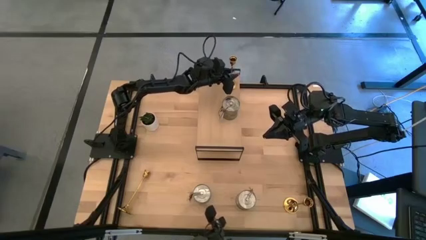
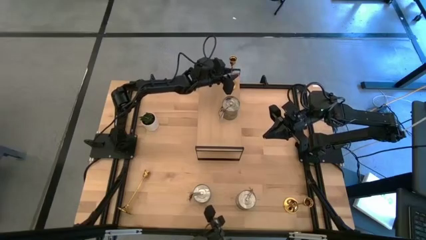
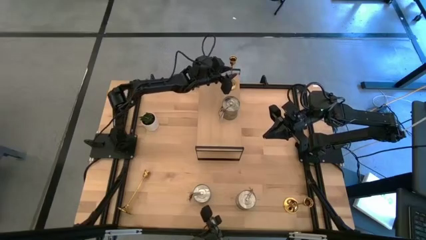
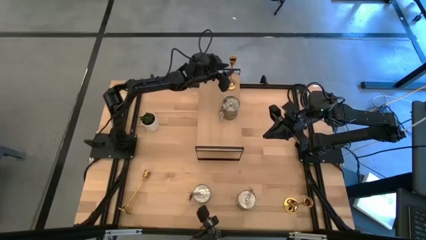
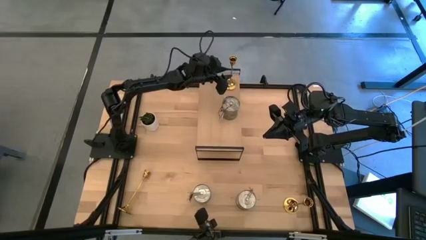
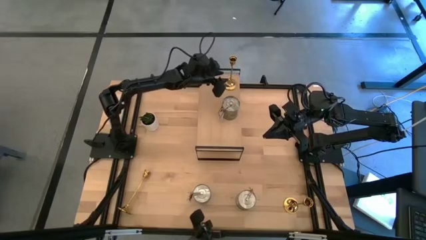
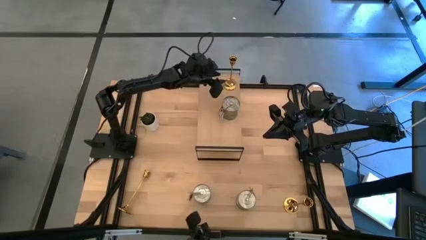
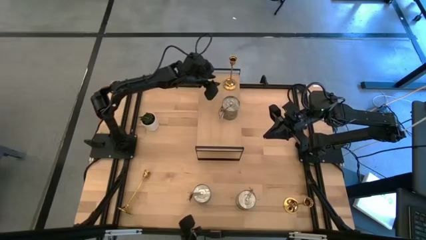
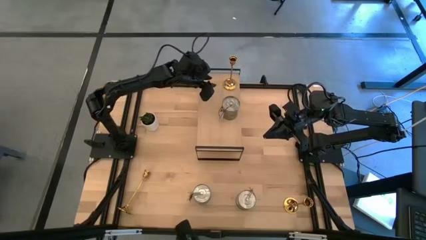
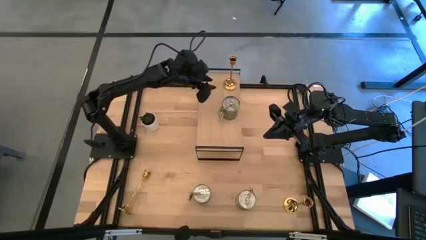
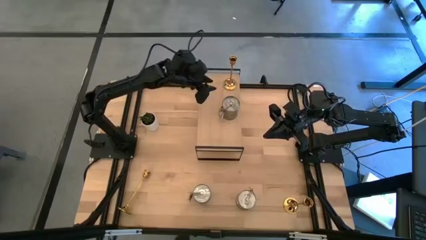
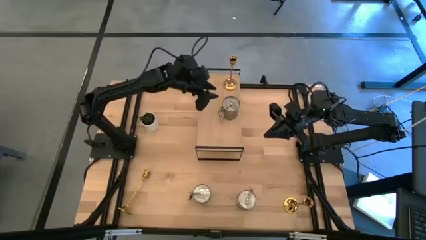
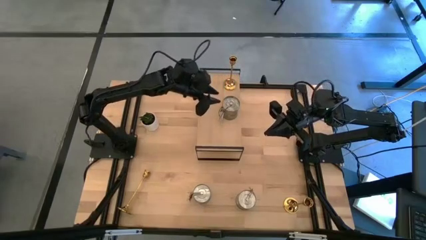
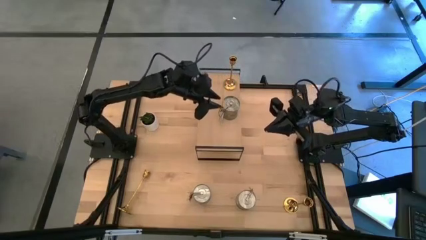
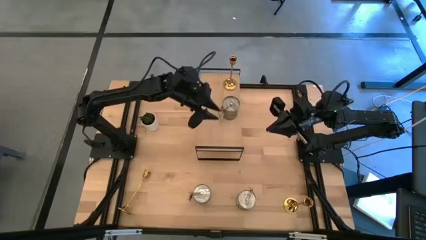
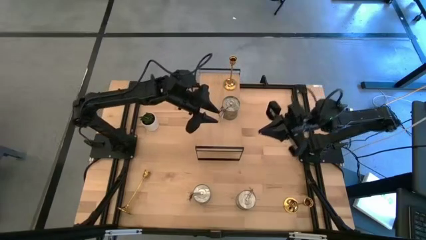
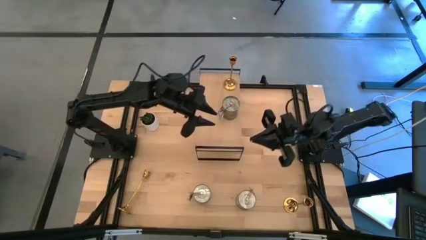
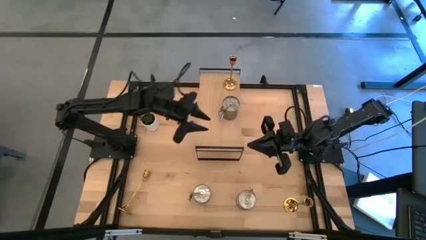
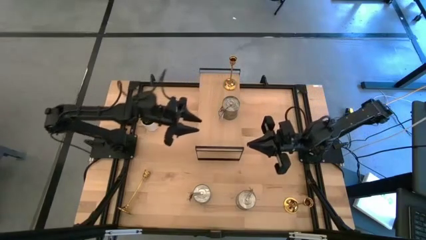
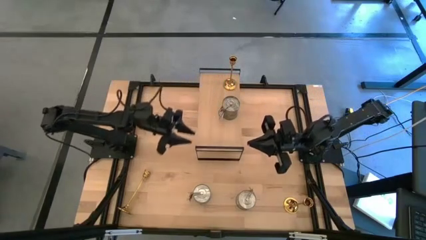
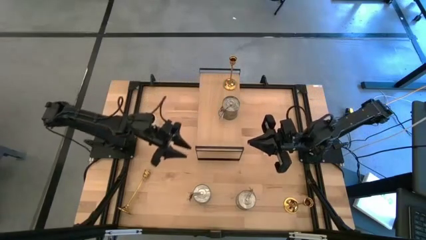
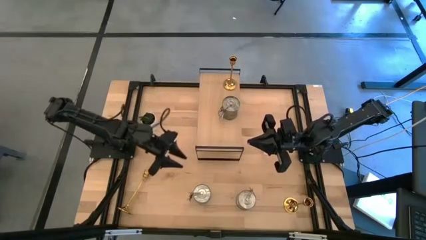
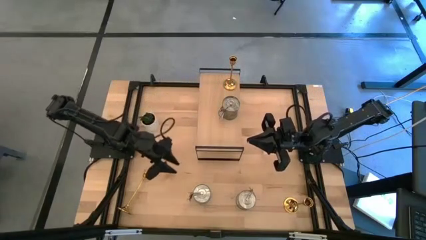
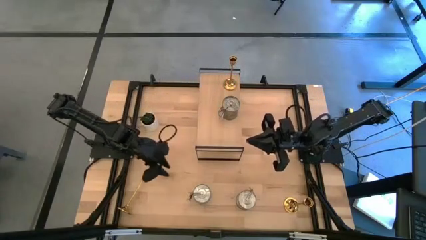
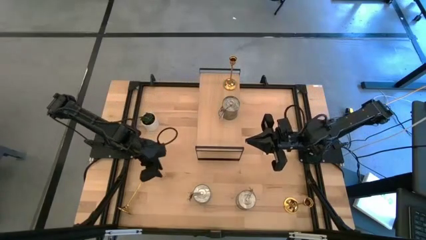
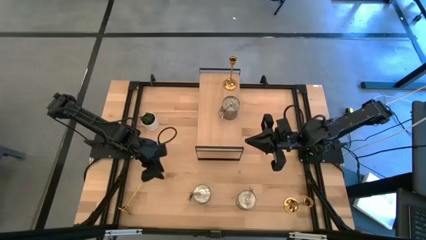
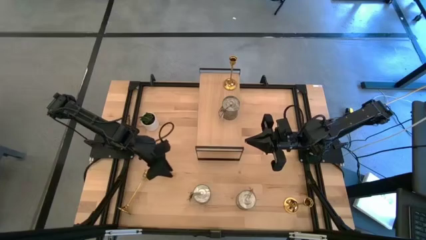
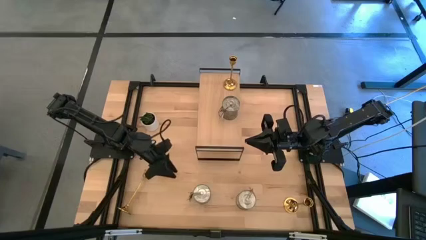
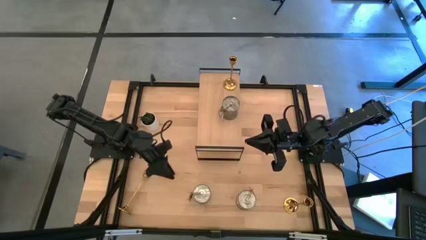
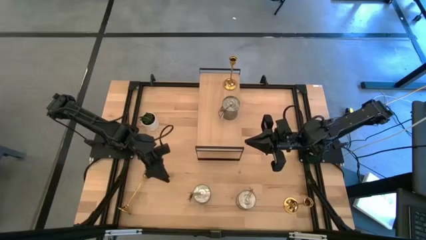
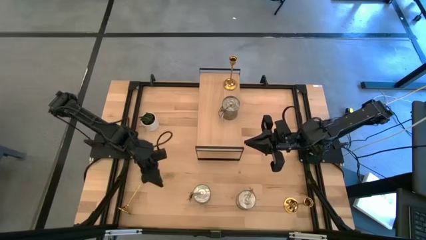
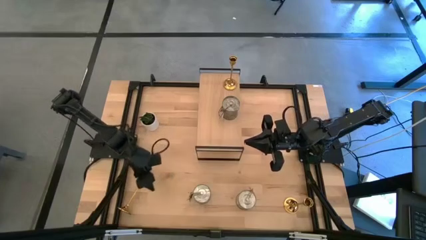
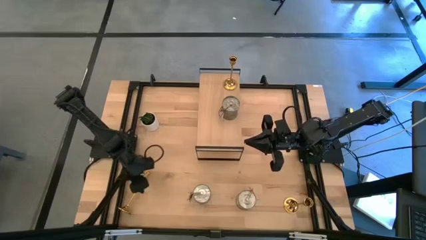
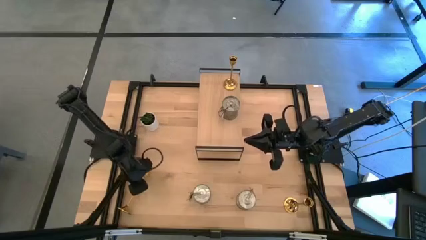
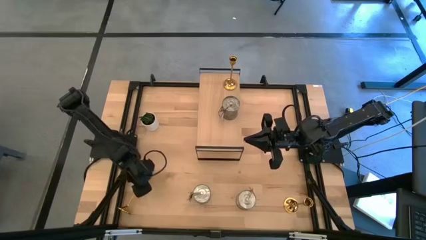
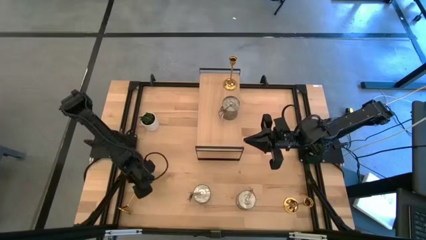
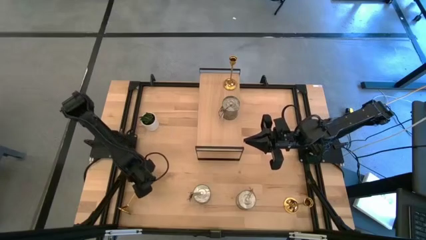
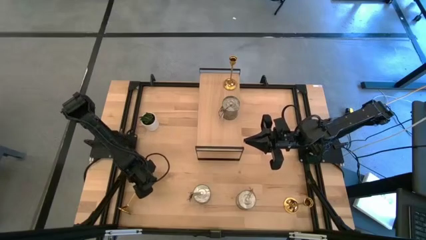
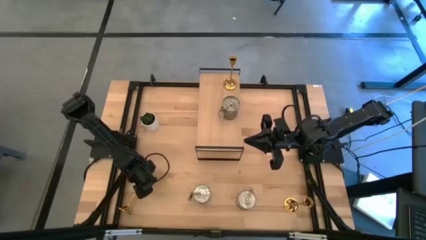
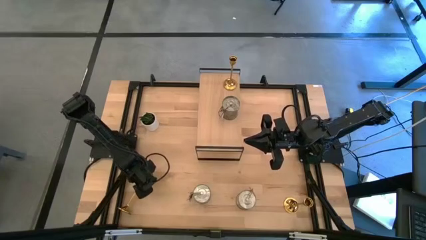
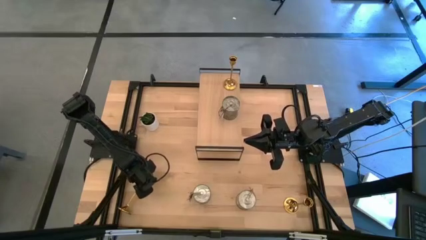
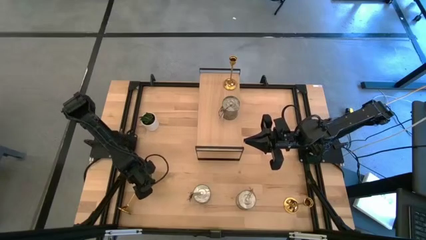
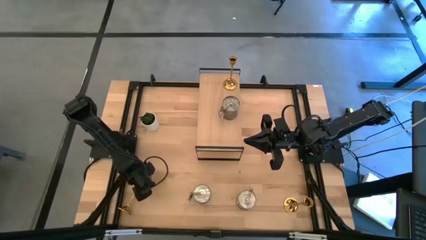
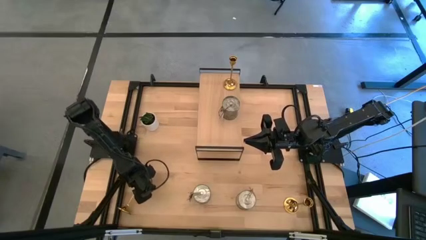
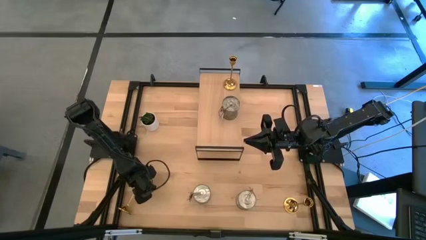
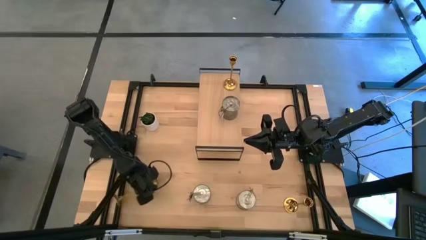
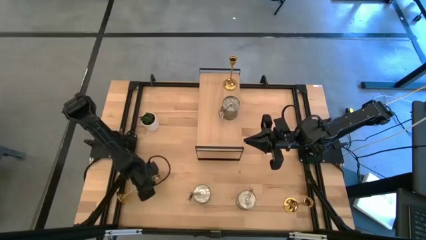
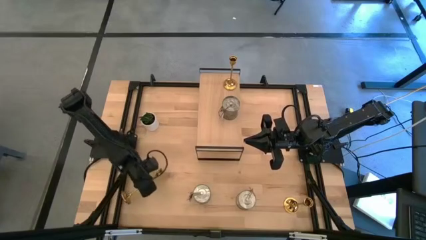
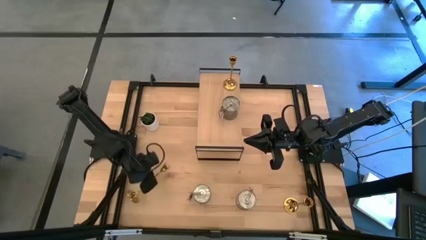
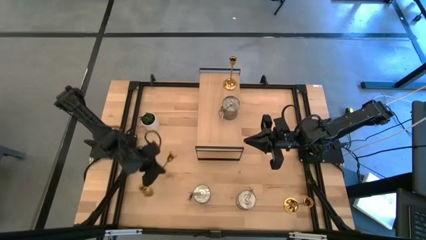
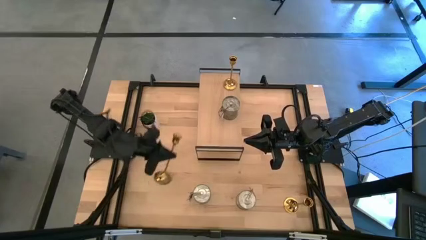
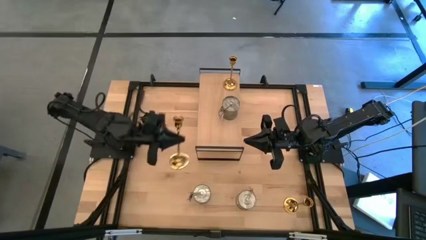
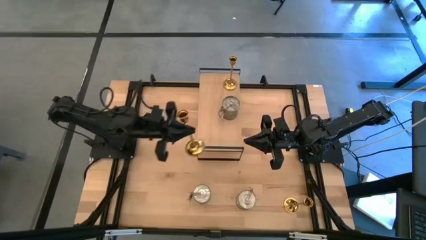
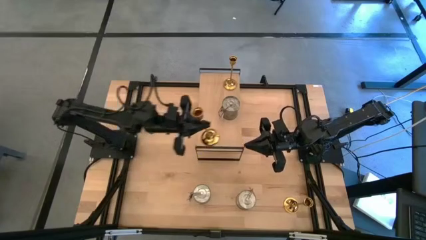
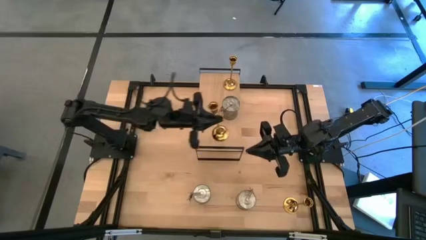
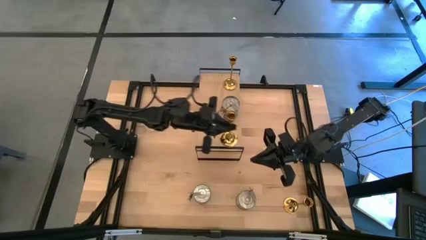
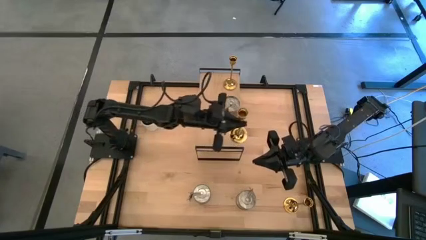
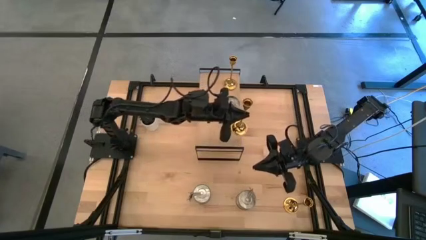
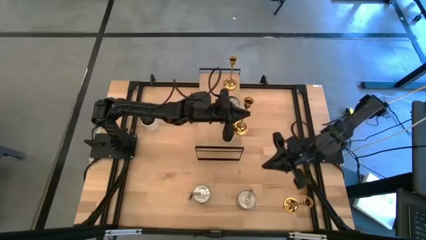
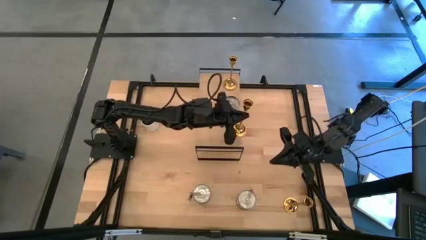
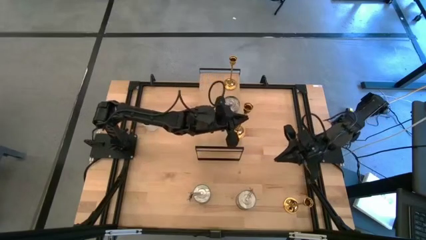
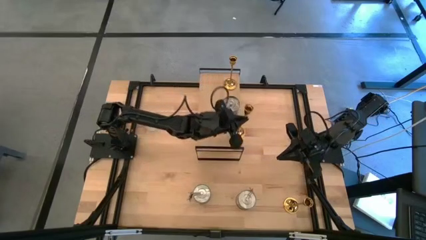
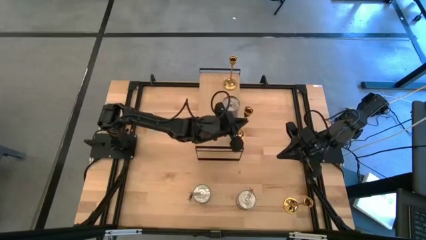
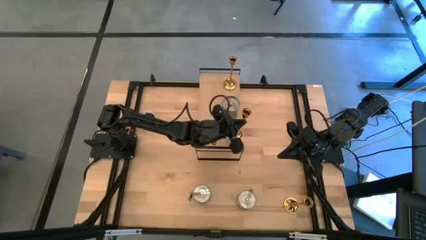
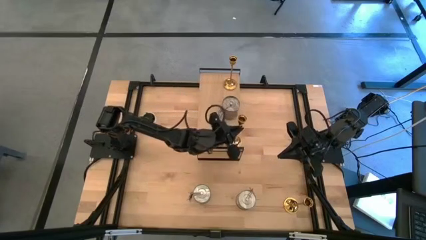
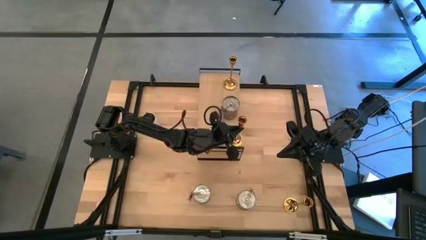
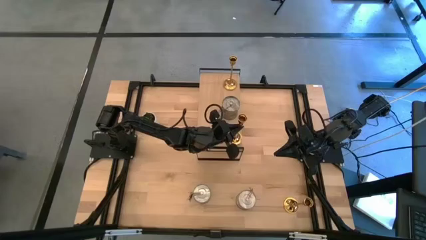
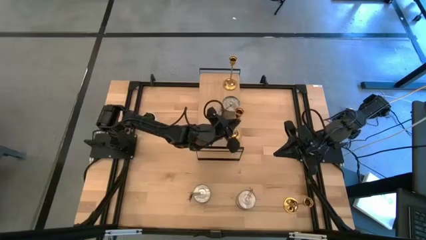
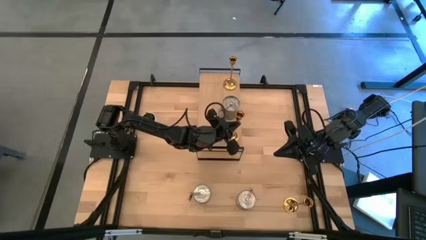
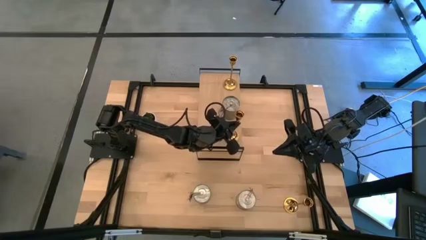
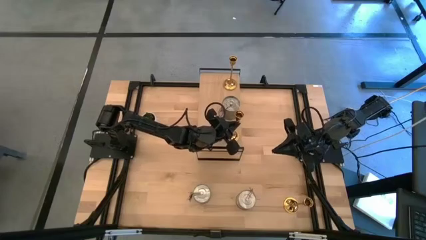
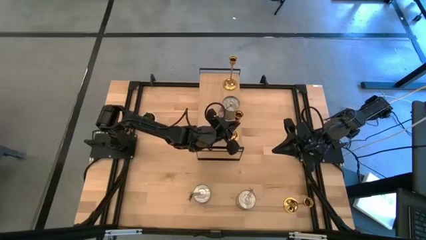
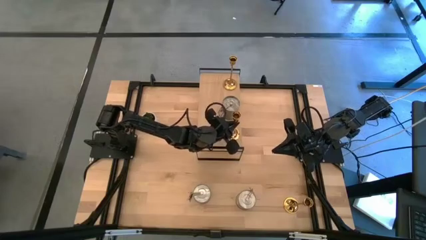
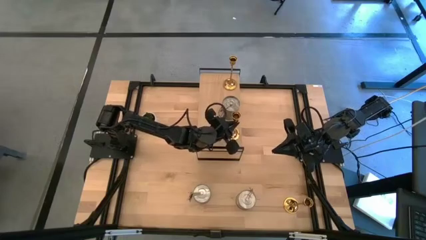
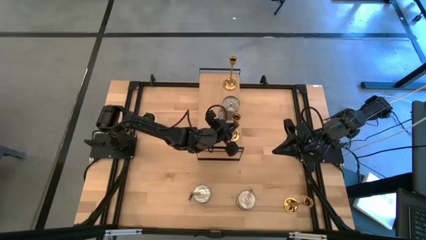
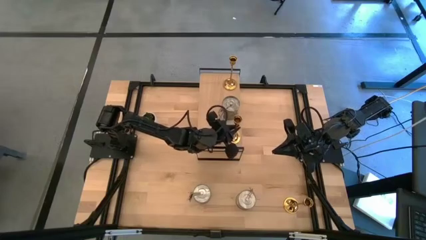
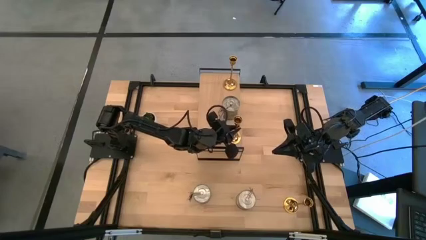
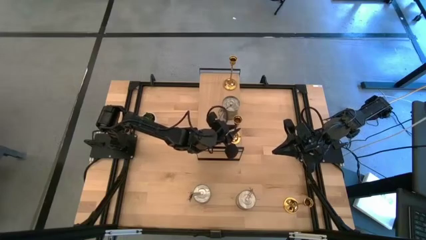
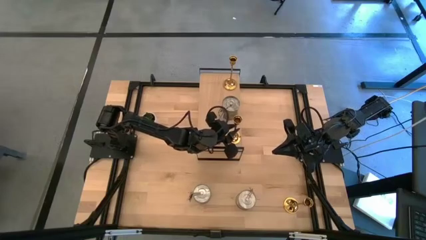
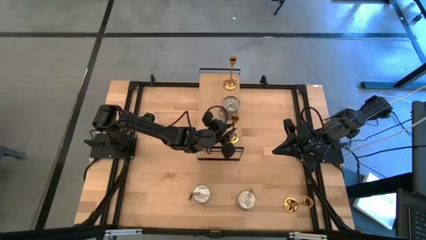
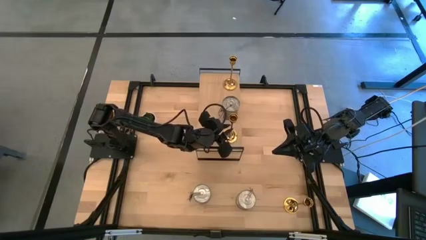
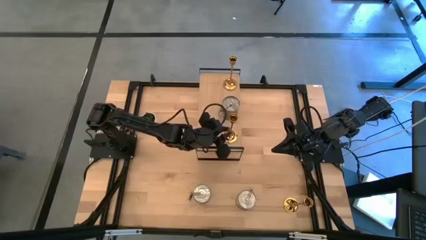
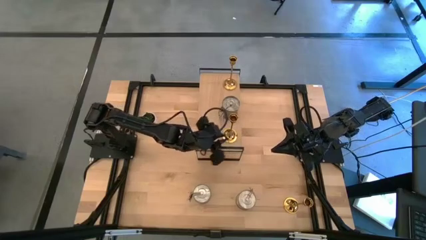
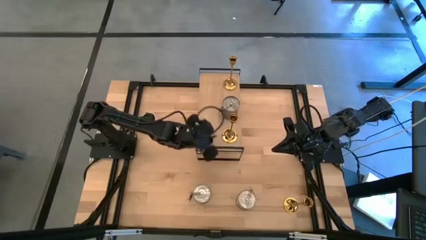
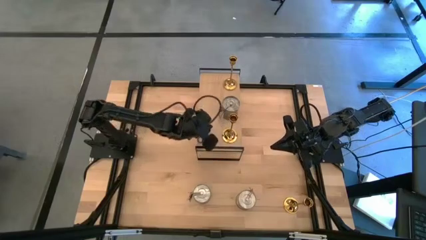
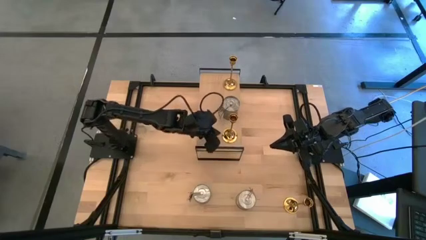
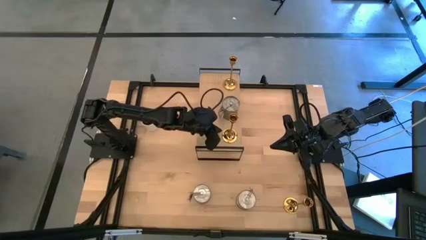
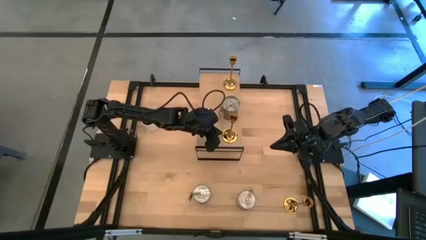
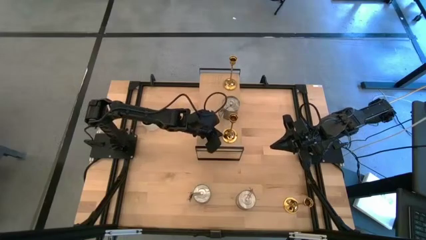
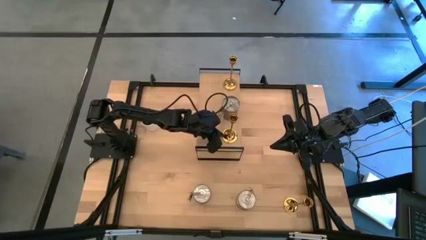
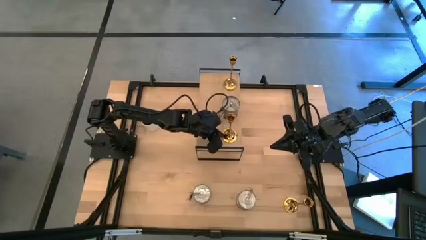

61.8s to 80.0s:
Task: Pick & Place candle stick holders
Put the left gold candle holder on the shelf
